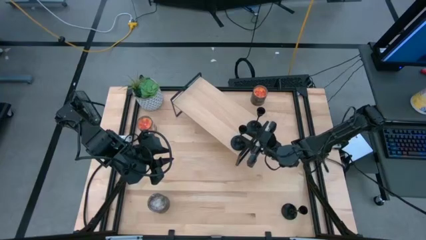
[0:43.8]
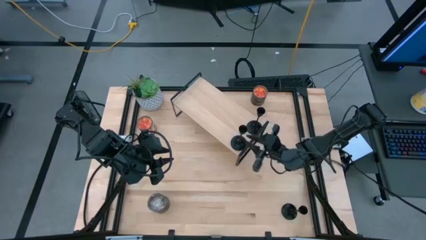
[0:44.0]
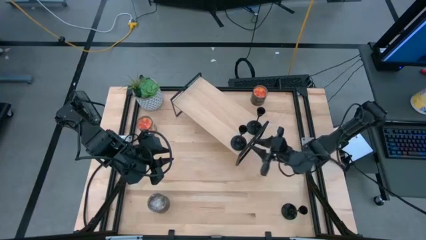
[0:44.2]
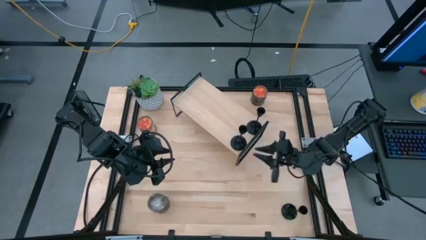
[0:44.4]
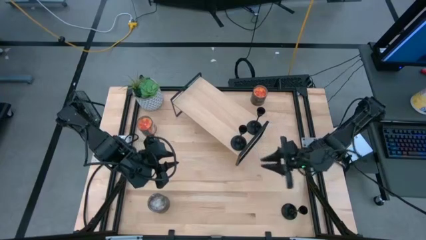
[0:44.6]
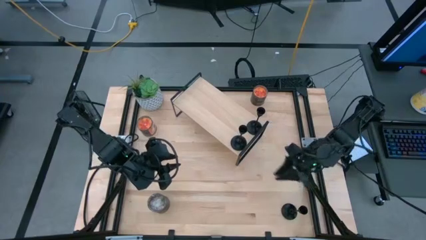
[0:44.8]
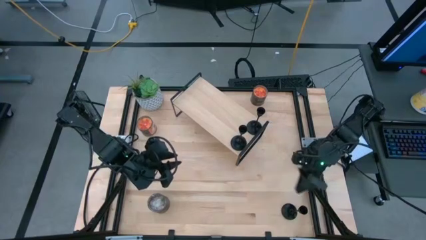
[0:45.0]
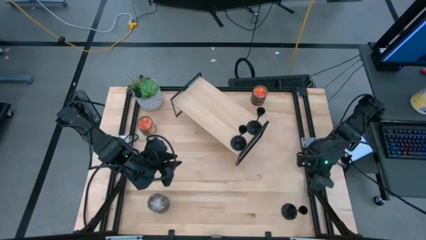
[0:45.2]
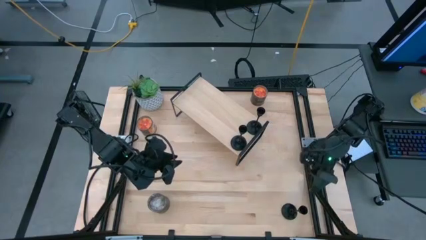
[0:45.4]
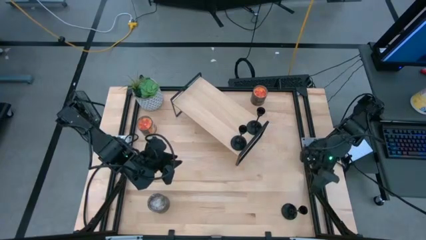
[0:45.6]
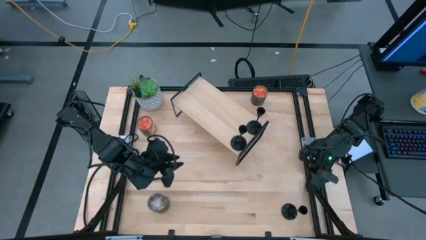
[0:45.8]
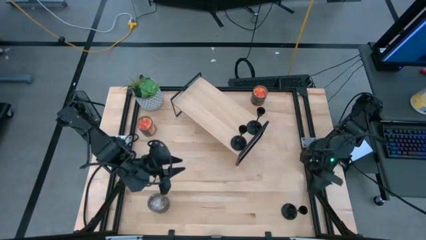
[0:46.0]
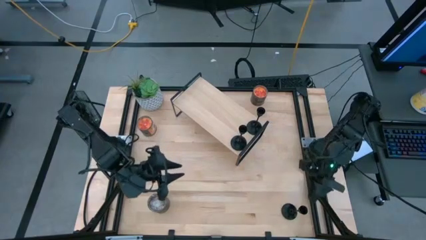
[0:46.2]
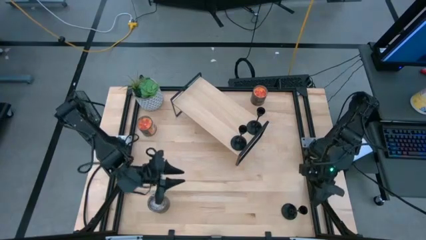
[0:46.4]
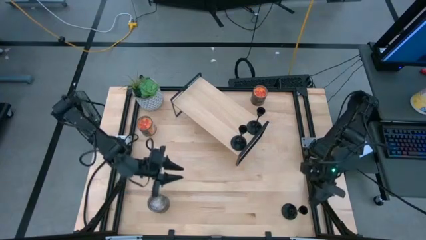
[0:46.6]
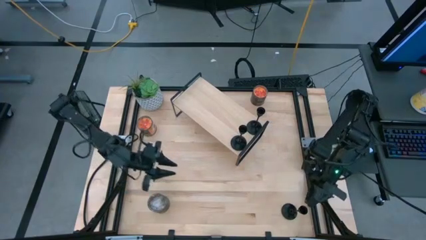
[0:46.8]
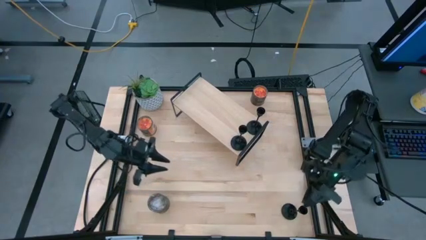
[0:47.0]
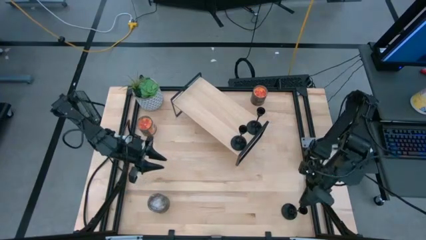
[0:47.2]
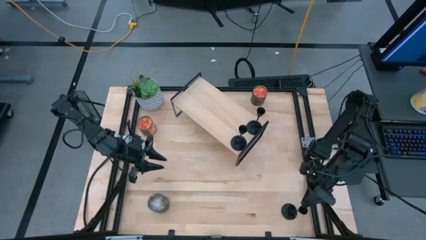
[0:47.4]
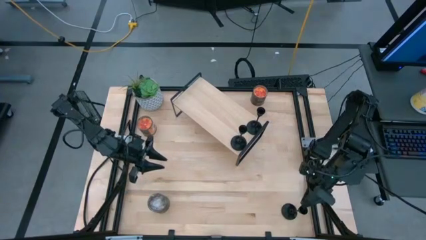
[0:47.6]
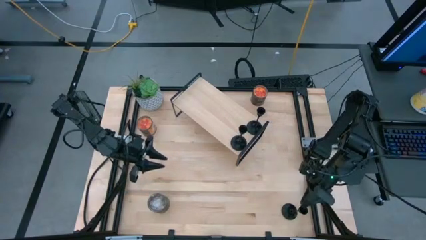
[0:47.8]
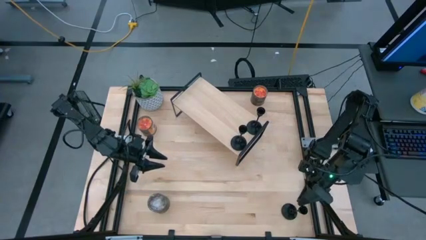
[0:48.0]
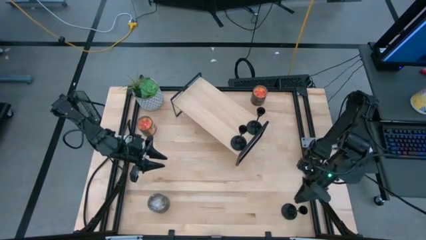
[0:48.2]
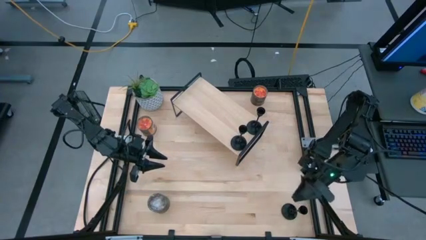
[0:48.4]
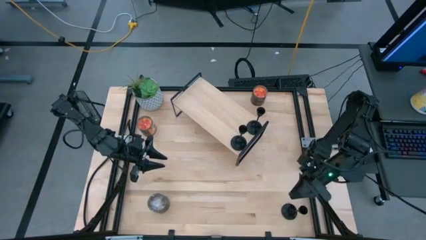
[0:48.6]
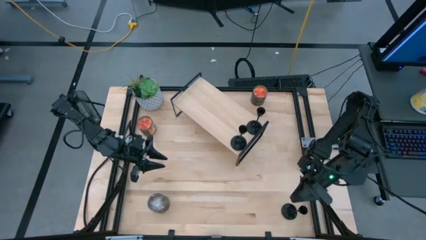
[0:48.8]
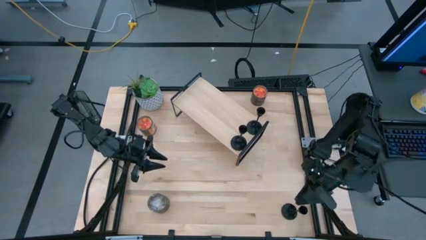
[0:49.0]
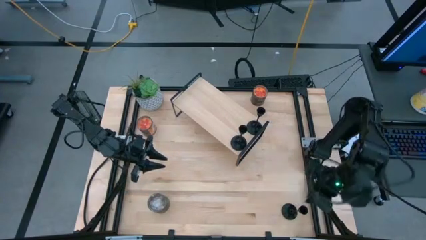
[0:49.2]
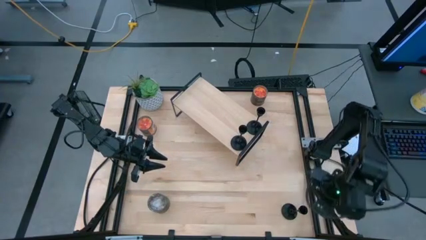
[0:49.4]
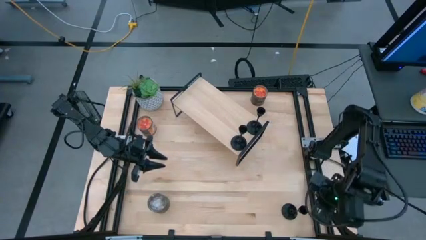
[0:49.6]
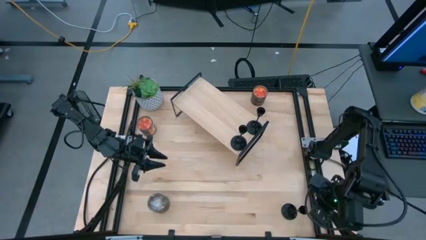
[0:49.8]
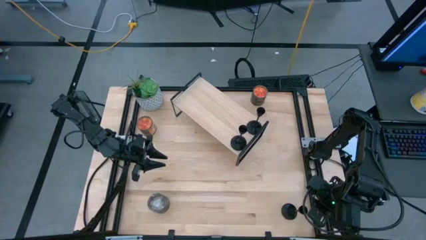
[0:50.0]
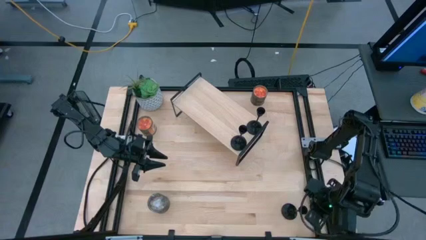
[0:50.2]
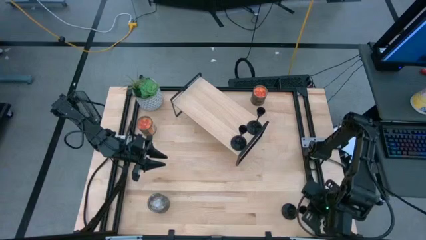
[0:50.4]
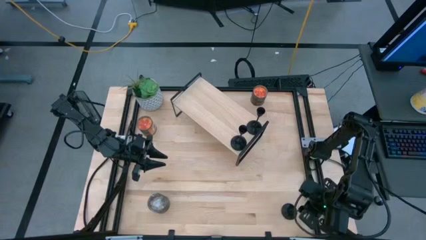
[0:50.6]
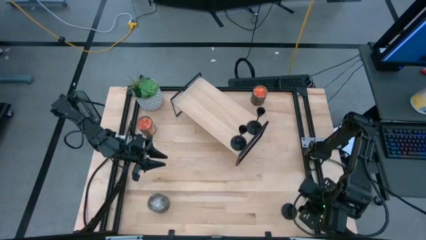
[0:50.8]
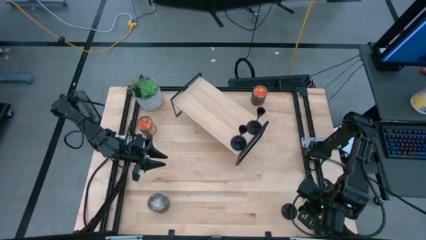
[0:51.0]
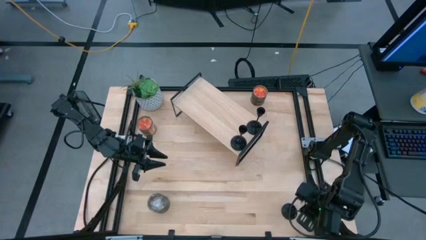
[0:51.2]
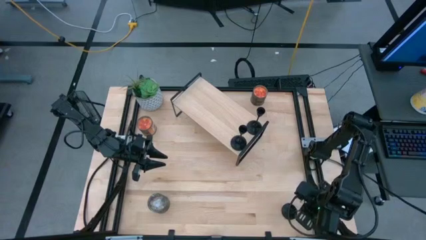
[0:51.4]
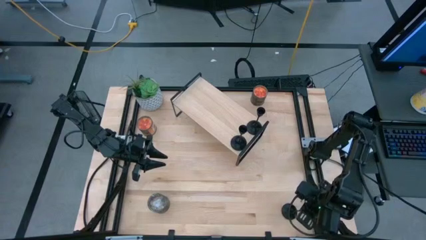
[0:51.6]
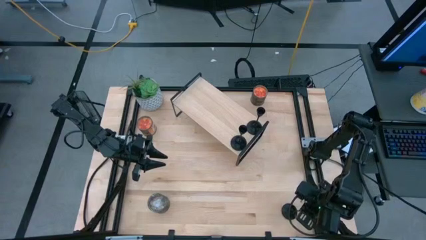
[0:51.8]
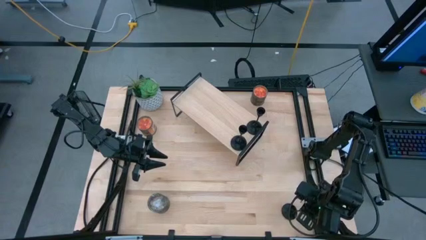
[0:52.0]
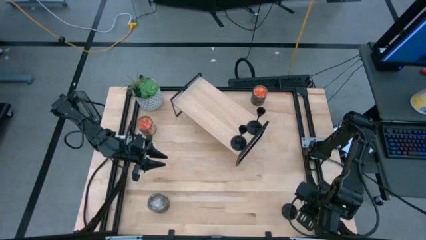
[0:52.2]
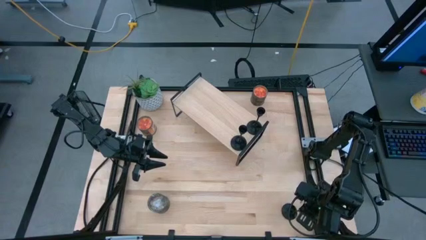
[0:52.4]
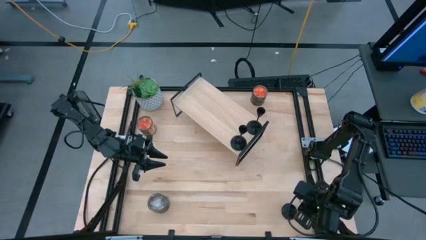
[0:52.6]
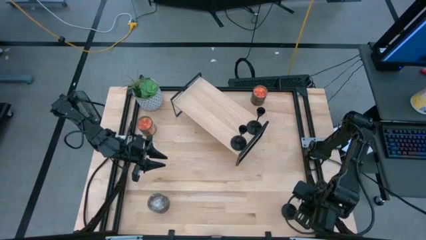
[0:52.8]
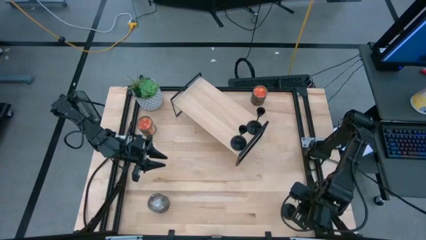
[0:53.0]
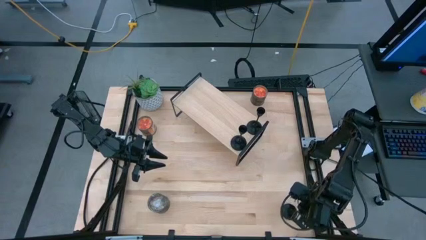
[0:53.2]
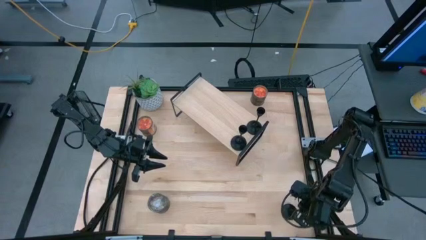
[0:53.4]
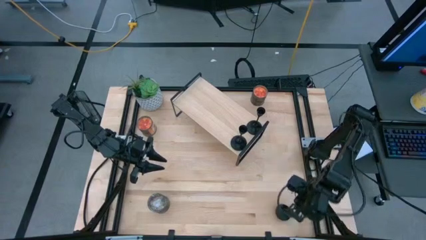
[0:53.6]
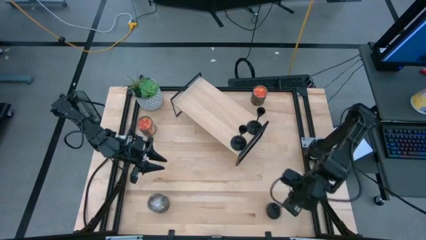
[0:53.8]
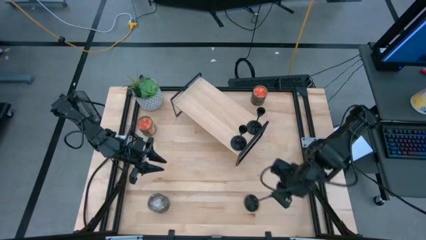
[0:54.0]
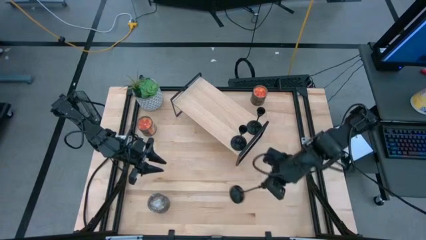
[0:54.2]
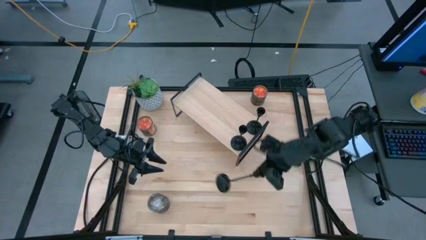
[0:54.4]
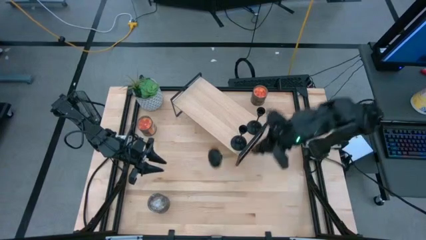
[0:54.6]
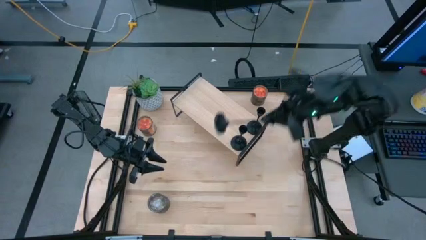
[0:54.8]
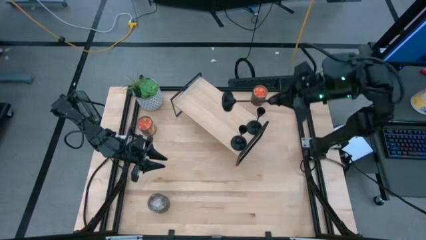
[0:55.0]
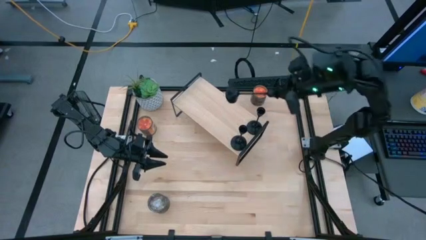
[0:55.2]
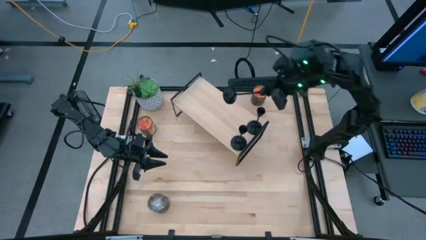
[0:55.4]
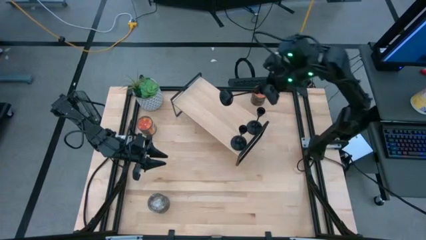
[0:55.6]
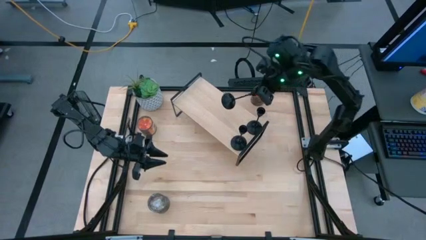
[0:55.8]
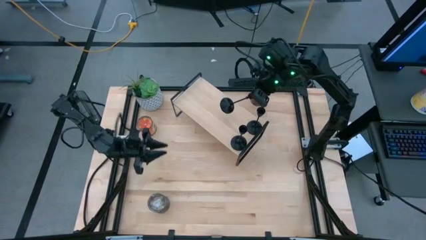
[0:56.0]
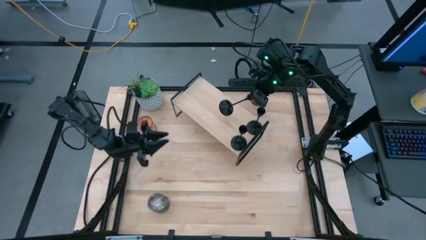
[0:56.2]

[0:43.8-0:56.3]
Task: Pick & Place candle stick holders
Put the black candle holder on the shelf
